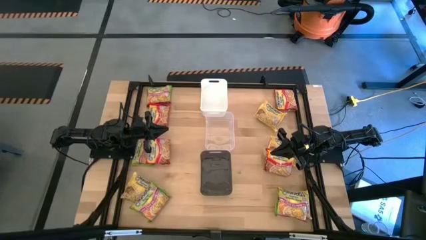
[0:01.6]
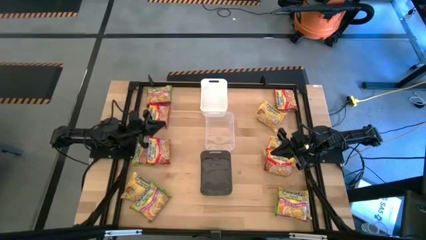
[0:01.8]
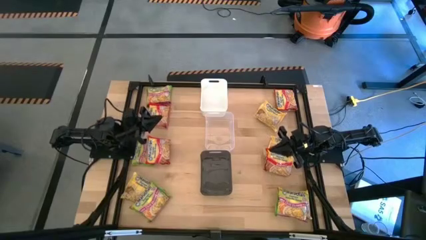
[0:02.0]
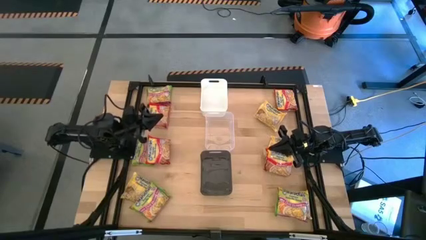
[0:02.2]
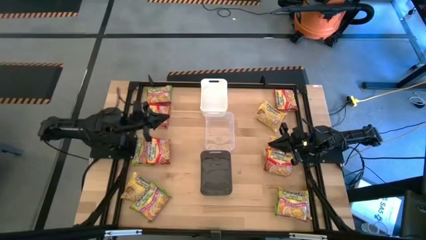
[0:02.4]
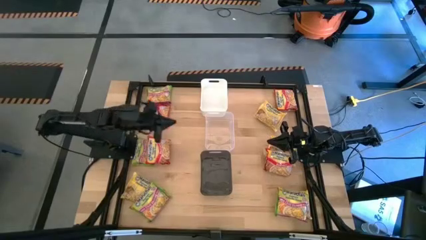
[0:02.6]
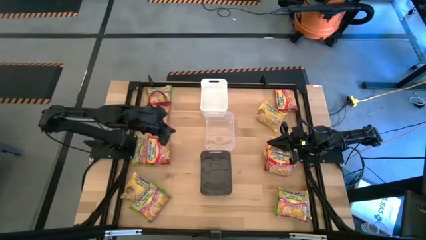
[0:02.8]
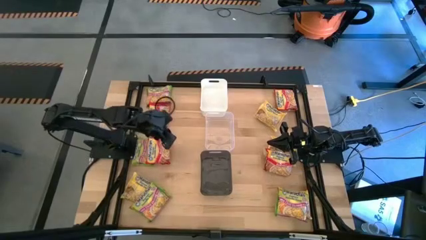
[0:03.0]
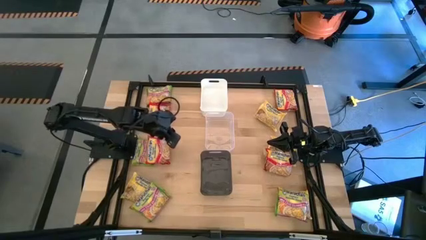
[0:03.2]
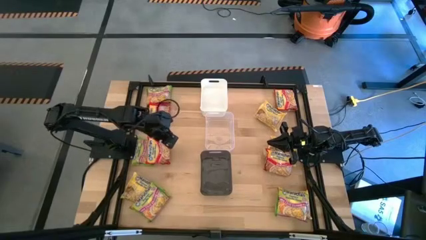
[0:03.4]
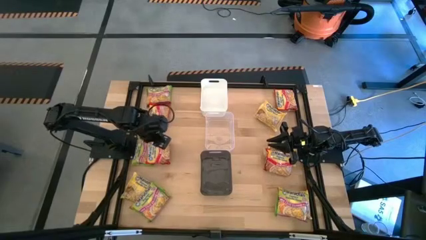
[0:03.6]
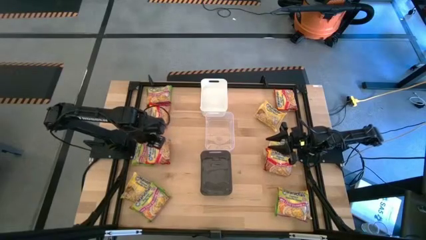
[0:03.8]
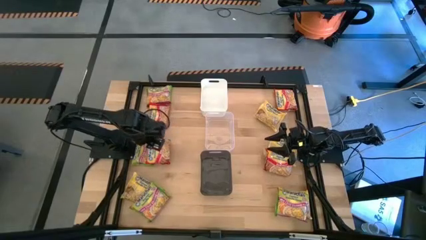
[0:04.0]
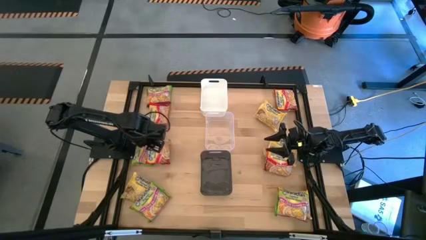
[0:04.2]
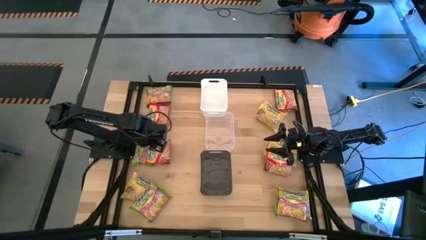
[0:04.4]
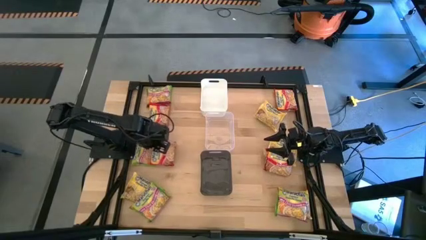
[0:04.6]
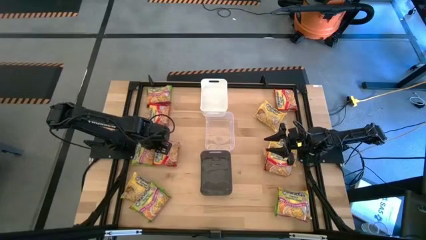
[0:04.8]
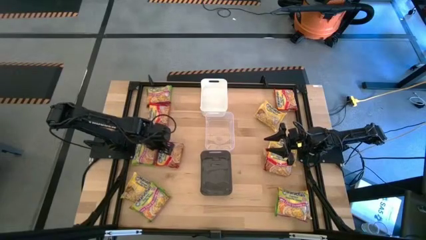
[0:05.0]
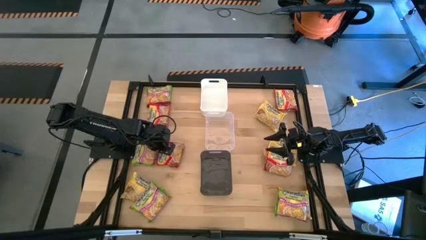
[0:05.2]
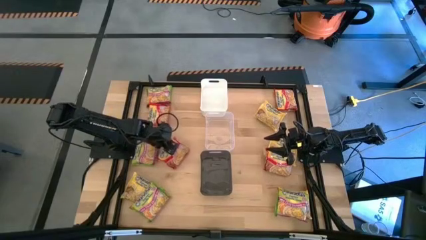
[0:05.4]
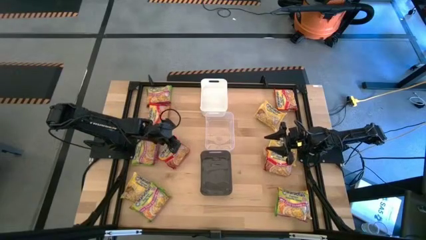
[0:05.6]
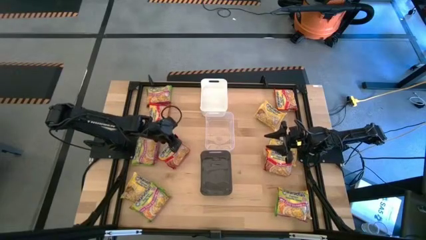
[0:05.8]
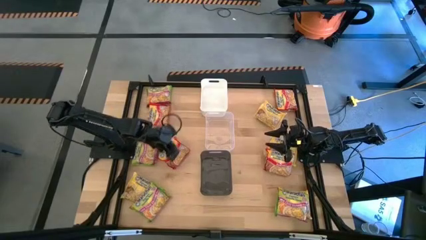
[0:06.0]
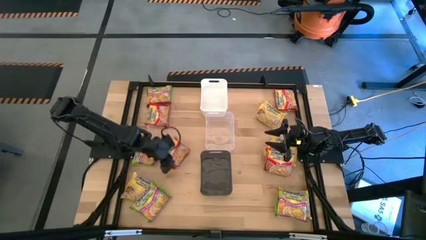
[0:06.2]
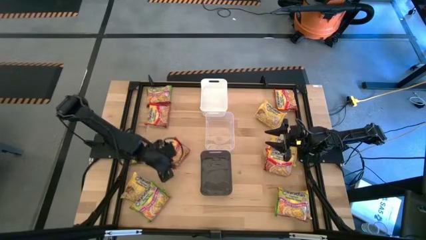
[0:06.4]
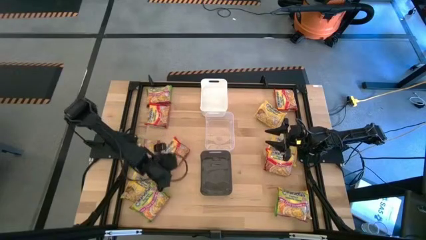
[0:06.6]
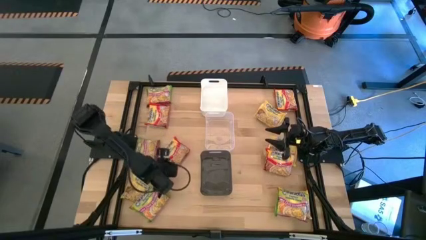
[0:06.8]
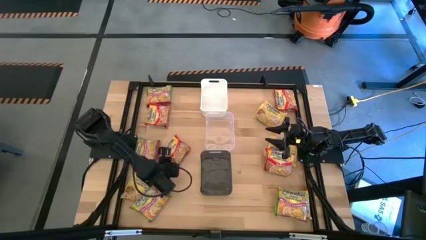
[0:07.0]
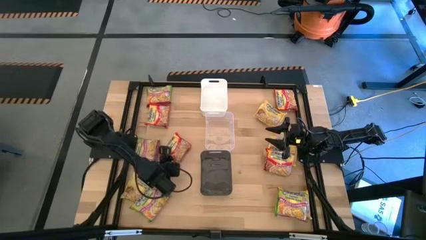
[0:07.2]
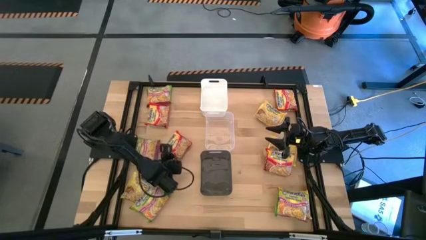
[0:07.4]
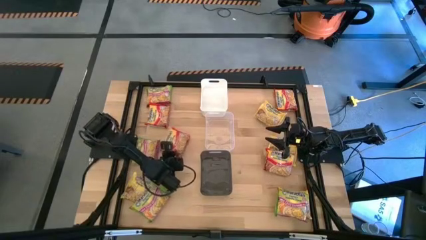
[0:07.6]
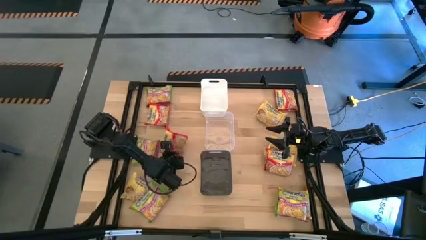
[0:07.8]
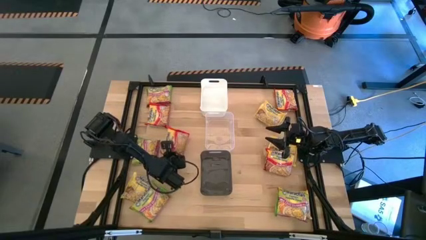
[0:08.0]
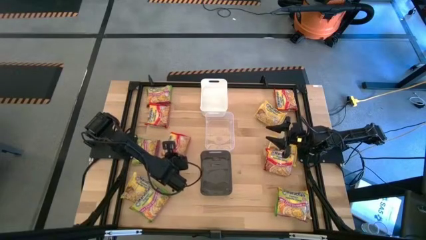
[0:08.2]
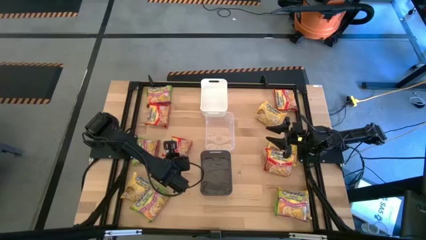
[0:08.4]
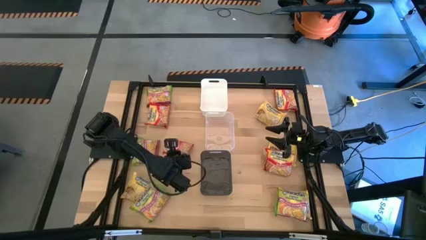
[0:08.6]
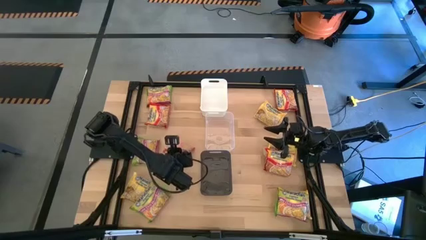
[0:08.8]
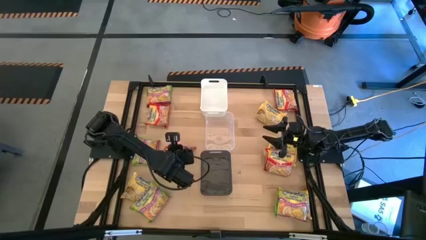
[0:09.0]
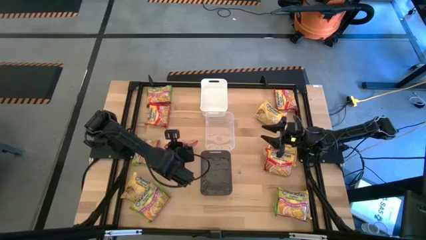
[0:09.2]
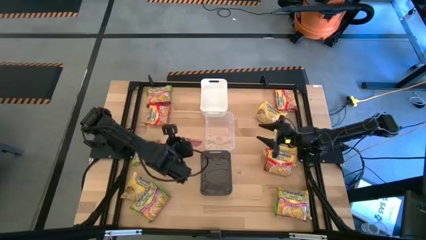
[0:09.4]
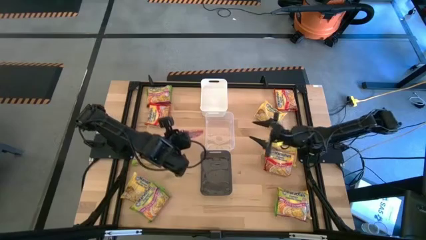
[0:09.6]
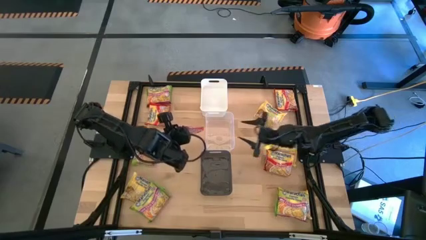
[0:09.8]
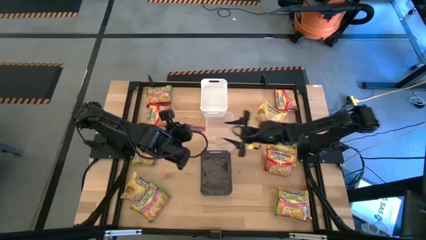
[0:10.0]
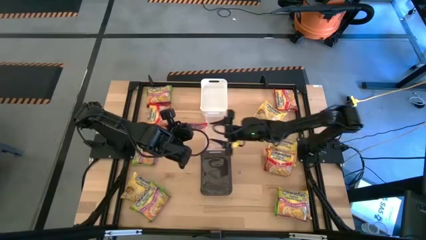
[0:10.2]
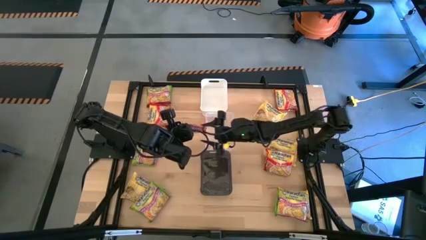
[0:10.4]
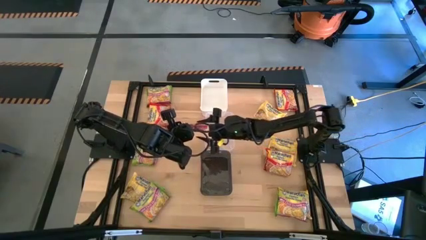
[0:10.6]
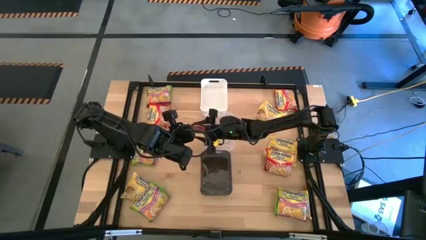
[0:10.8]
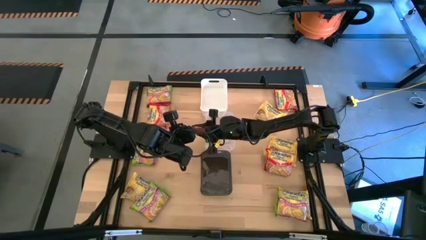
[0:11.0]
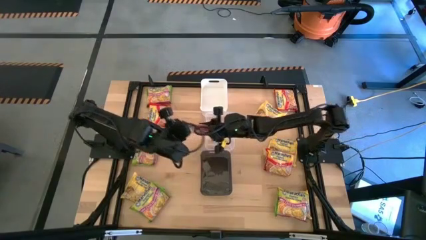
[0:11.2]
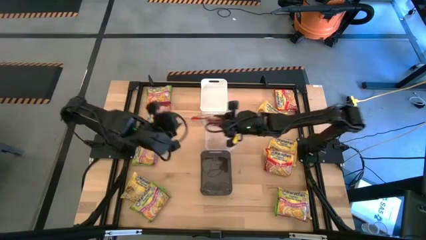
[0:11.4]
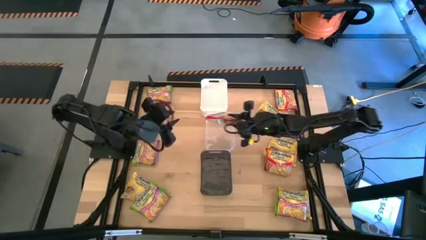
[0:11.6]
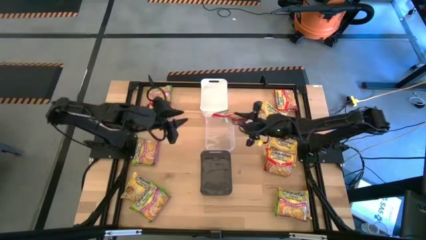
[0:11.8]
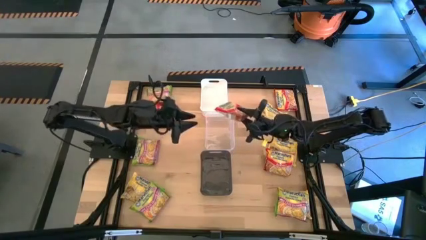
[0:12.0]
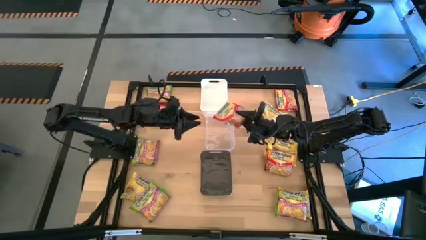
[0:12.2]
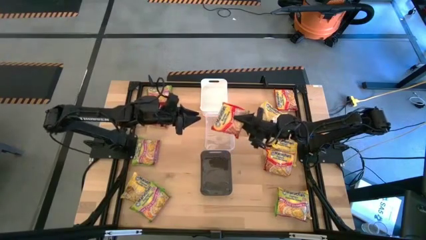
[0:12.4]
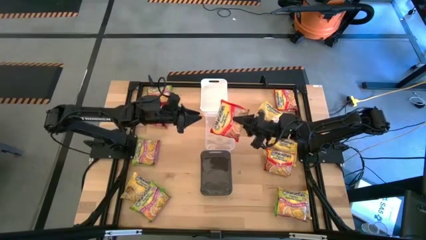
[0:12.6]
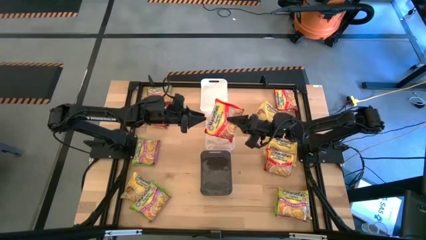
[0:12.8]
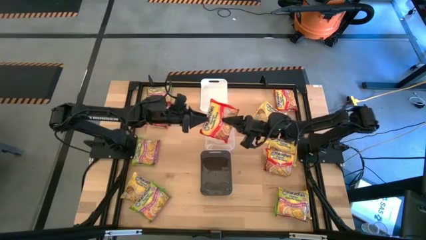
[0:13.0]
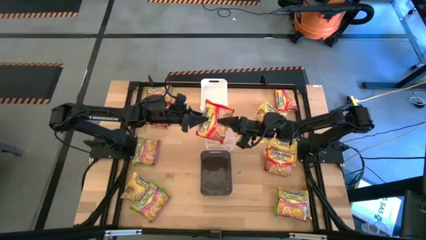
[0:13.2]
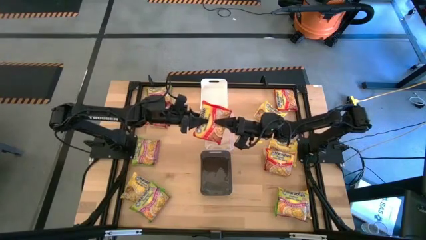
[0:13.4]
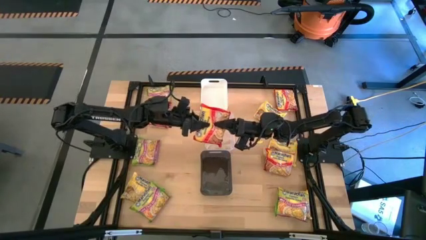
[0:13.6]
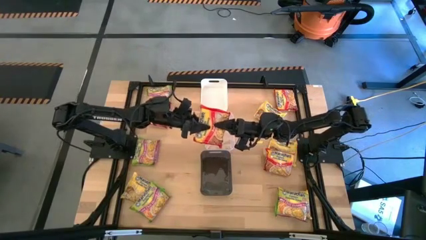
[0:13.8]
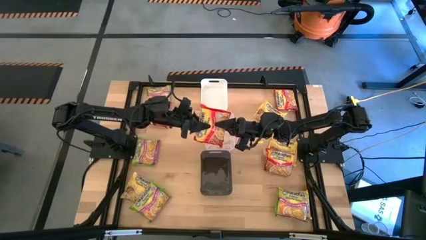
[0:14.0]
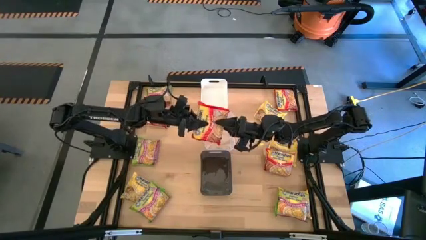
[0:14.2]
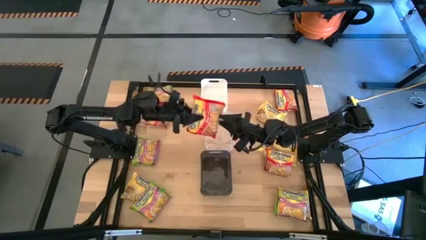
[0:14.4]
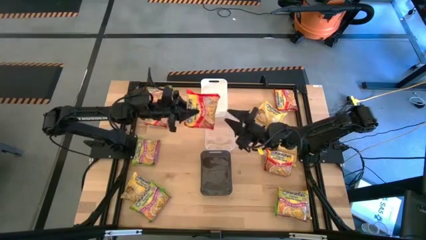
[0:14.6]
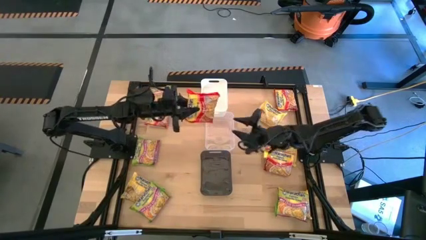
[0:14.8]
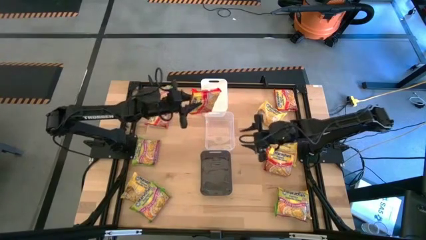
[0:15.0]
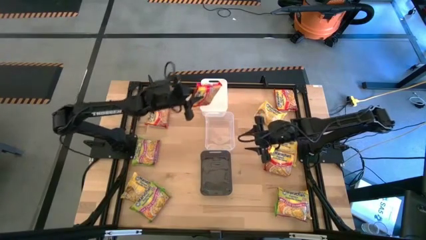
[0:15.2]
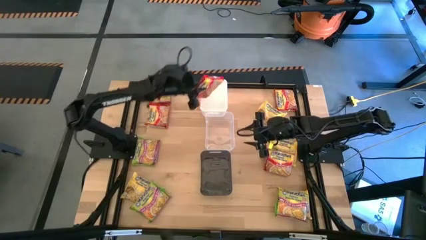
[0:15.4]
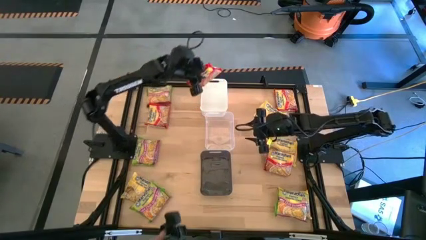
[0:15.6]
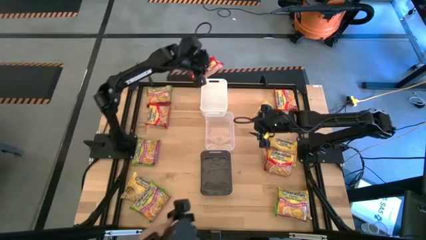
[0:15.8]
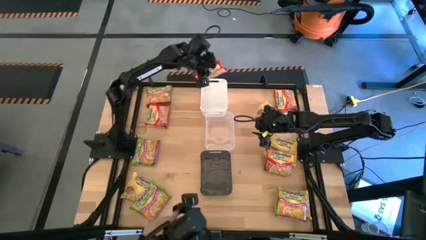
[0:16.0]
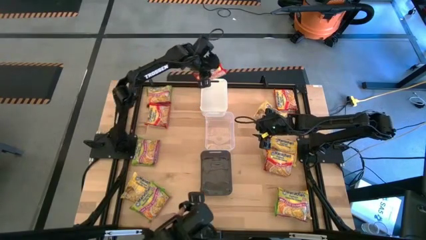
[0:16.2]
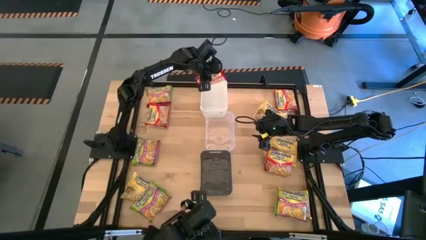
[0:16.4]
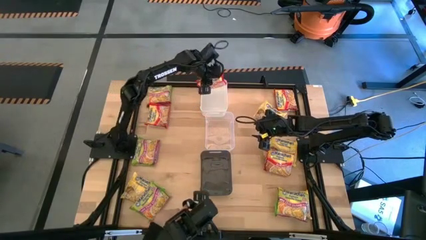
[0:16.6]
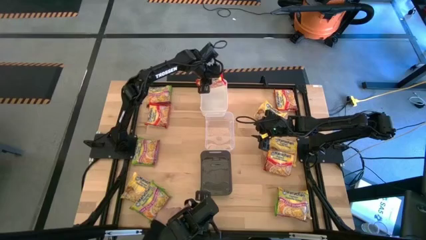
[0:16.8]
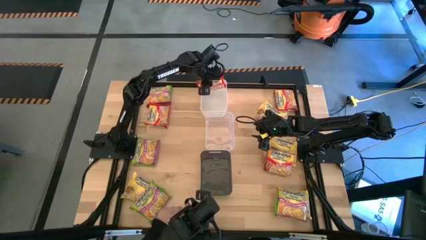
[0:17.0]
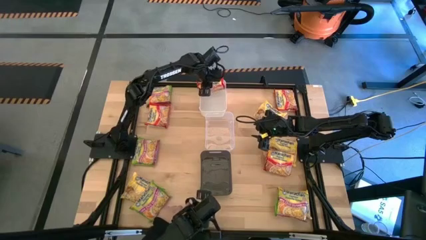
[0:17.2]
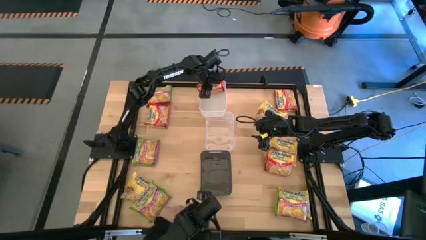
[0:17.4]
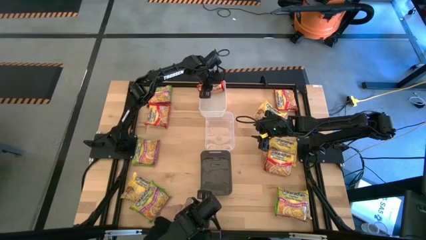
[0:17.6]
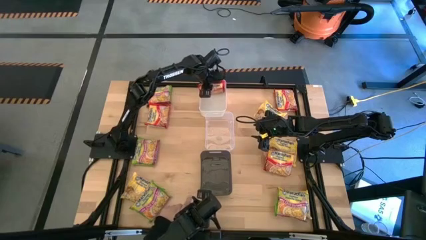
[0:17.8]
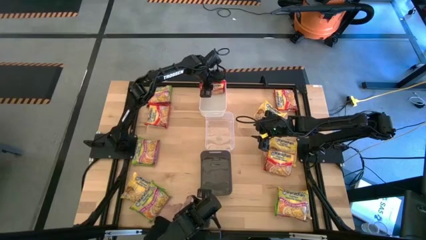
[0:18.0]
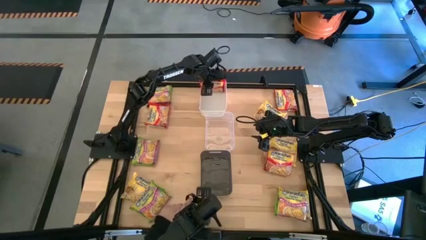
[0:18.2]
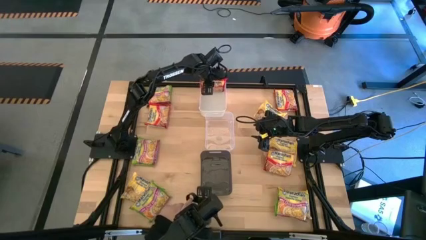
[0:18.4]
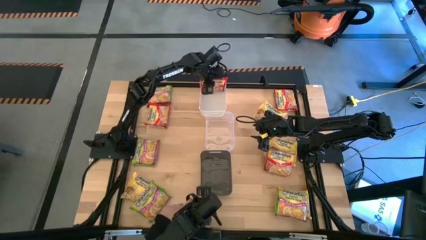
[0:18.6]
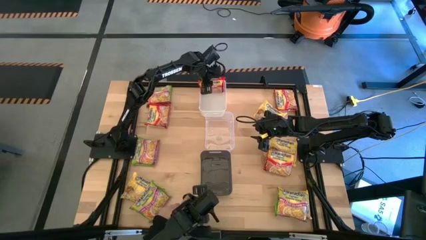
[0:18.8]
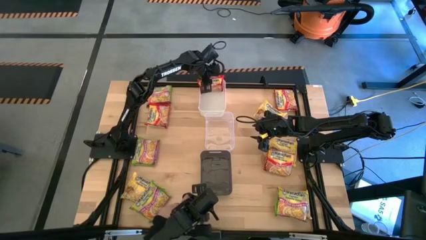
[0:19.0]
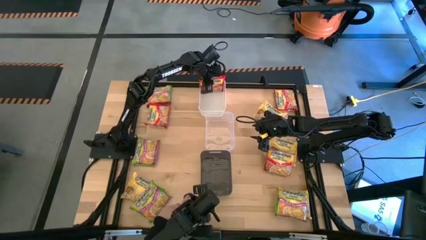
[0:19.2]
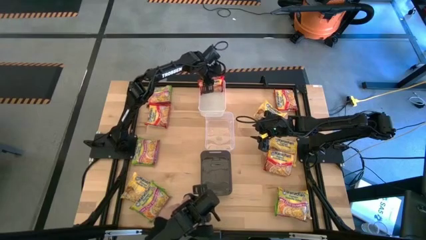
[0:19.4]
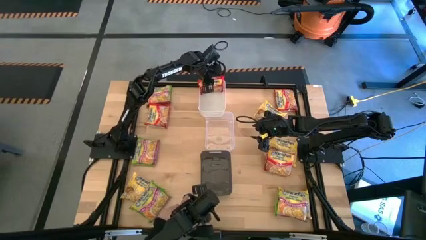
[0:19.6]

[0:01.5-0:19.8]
Task: Sort Maruchan noodles
Put the red noodle pack into the white bin
